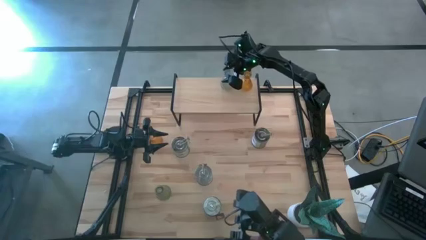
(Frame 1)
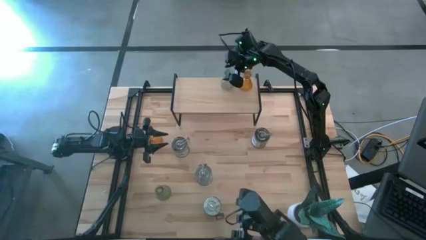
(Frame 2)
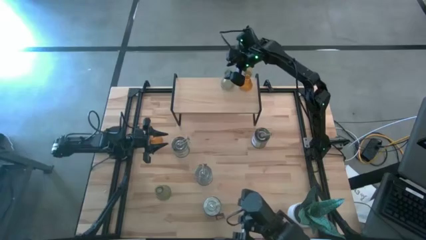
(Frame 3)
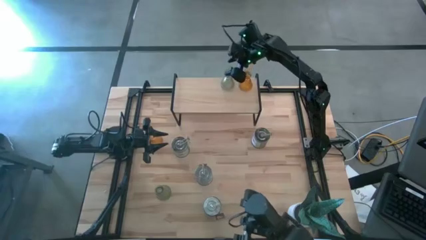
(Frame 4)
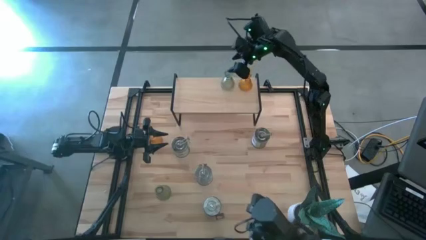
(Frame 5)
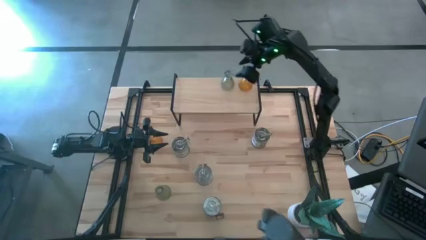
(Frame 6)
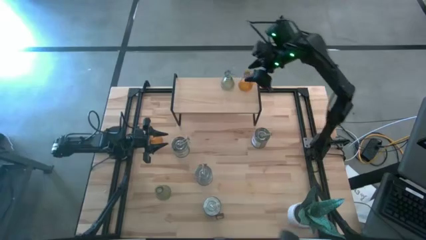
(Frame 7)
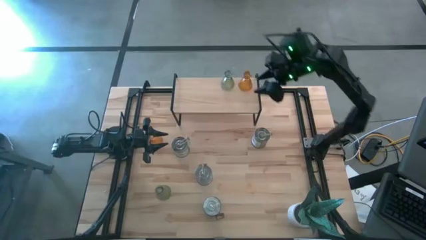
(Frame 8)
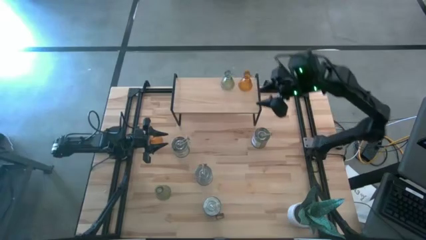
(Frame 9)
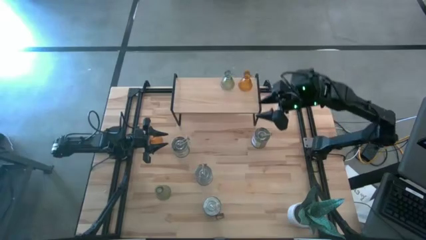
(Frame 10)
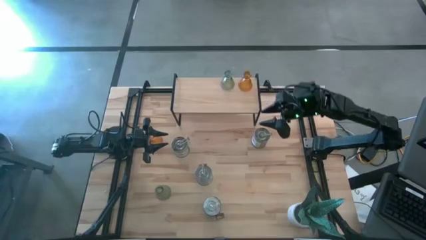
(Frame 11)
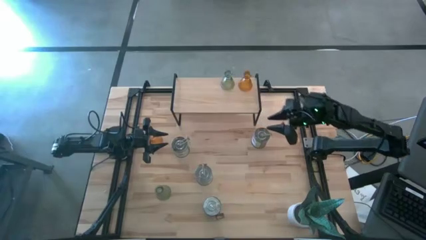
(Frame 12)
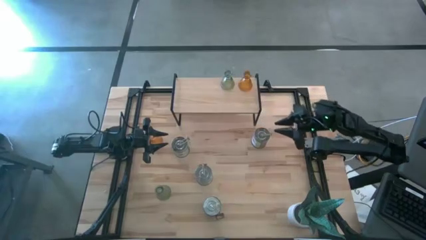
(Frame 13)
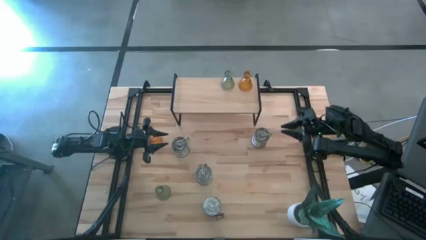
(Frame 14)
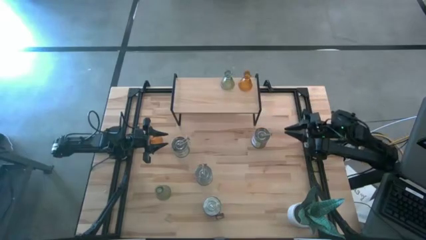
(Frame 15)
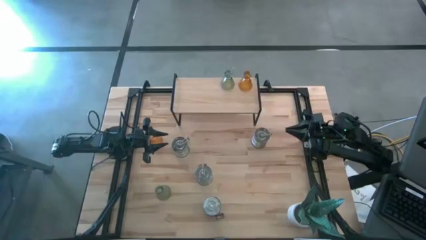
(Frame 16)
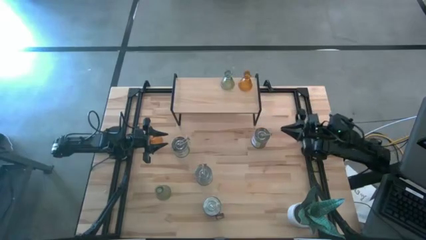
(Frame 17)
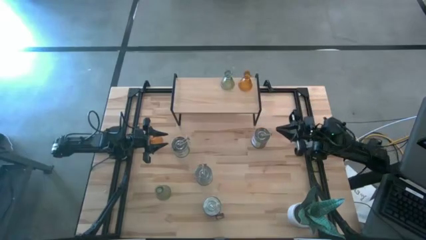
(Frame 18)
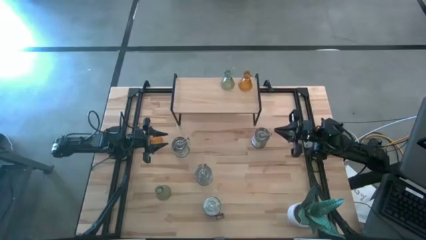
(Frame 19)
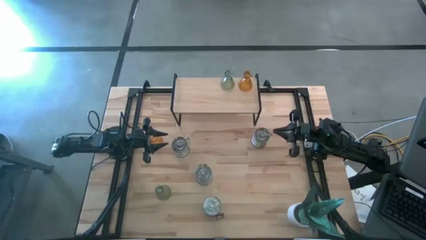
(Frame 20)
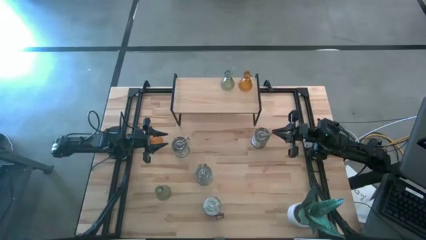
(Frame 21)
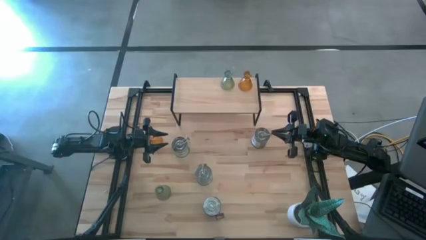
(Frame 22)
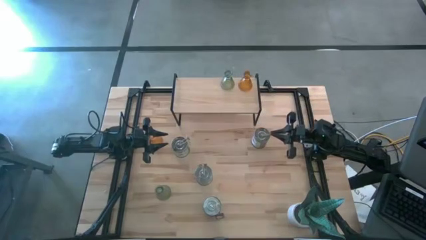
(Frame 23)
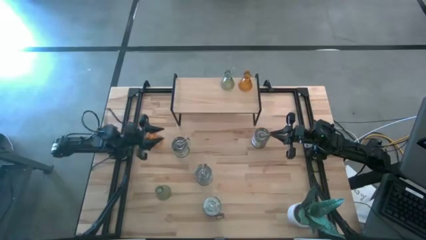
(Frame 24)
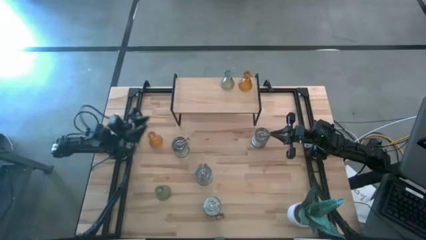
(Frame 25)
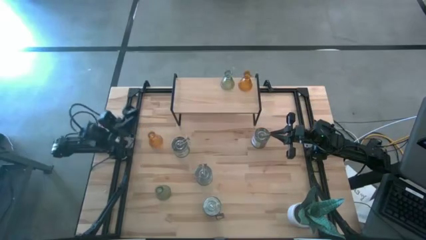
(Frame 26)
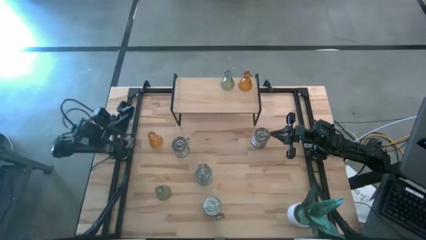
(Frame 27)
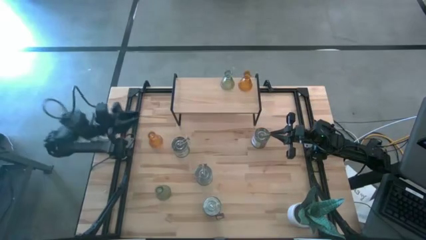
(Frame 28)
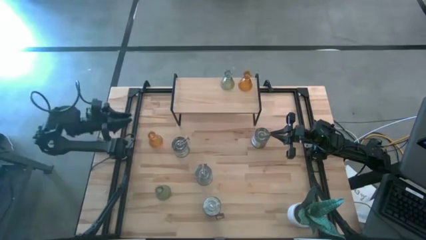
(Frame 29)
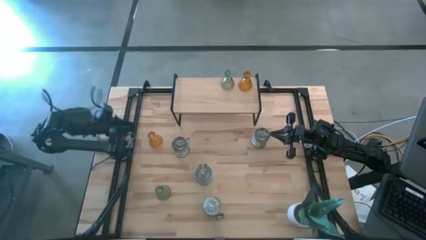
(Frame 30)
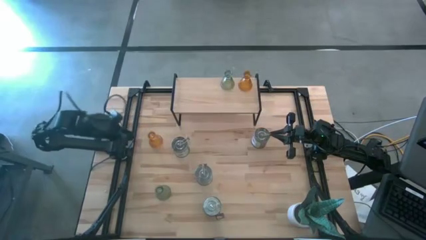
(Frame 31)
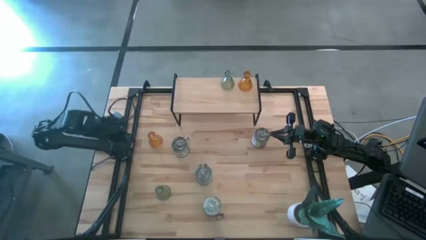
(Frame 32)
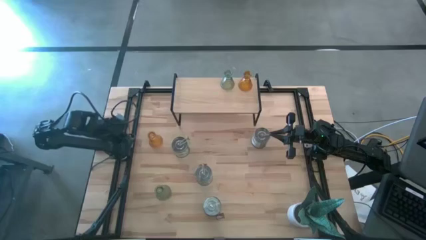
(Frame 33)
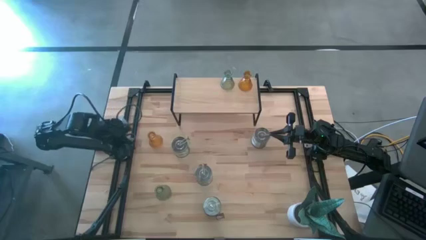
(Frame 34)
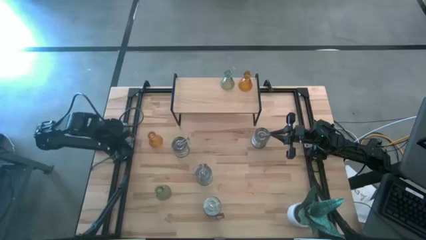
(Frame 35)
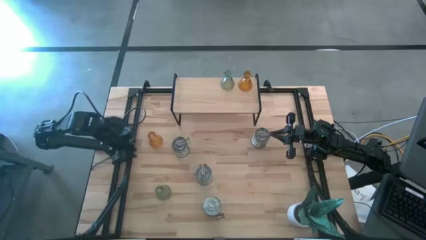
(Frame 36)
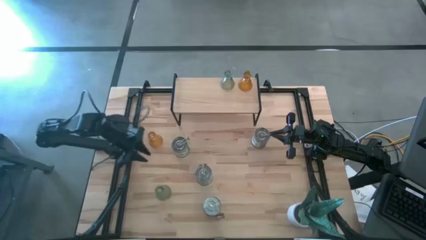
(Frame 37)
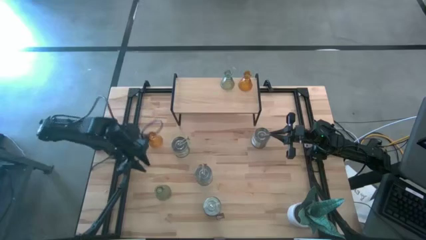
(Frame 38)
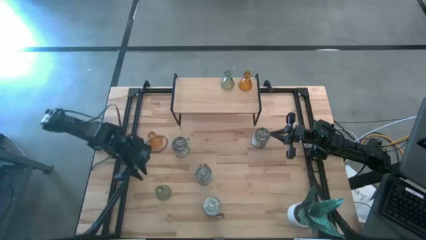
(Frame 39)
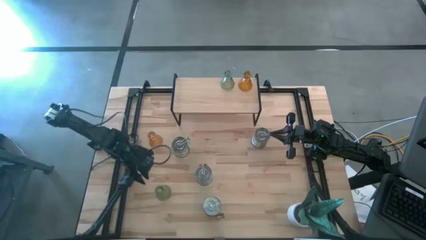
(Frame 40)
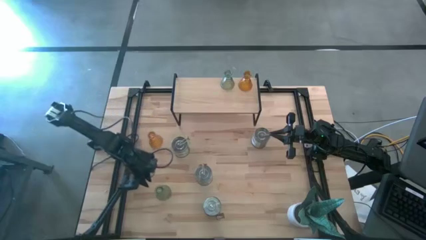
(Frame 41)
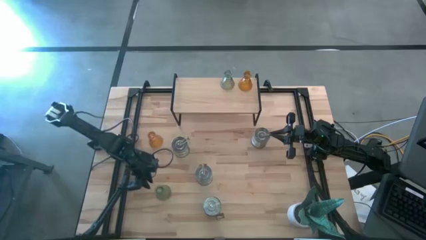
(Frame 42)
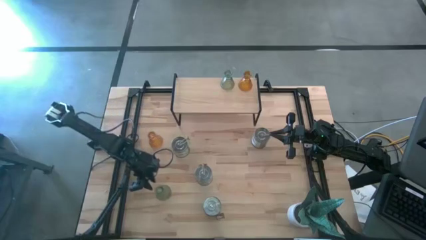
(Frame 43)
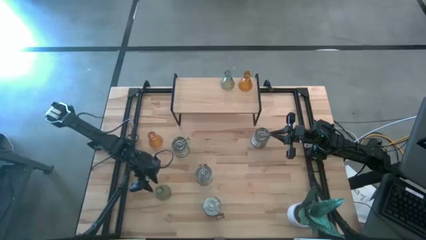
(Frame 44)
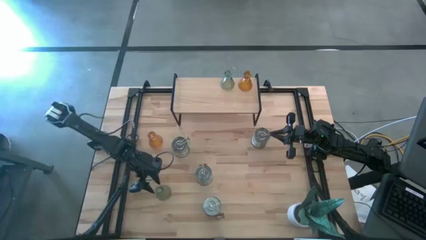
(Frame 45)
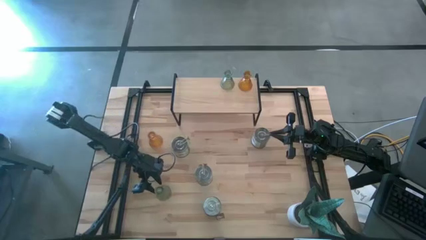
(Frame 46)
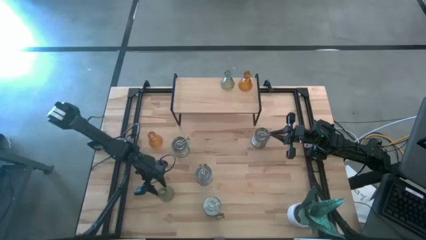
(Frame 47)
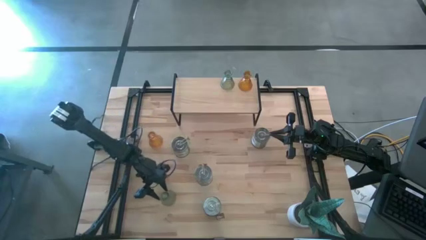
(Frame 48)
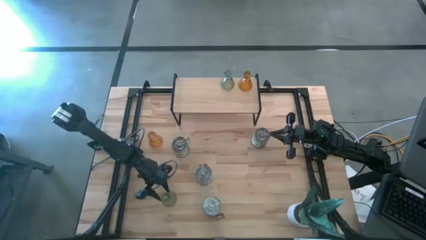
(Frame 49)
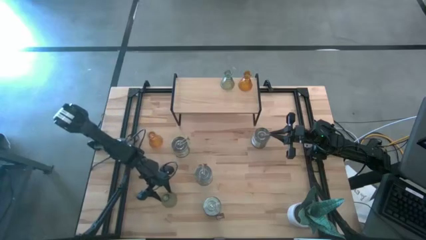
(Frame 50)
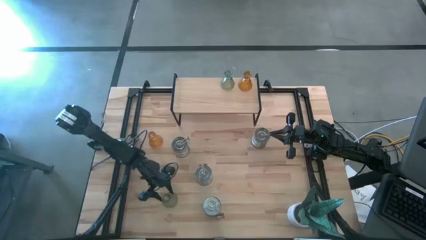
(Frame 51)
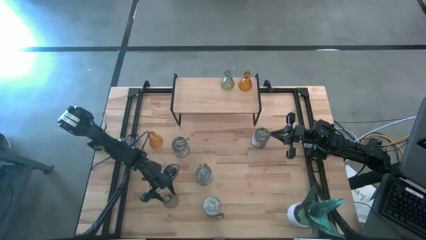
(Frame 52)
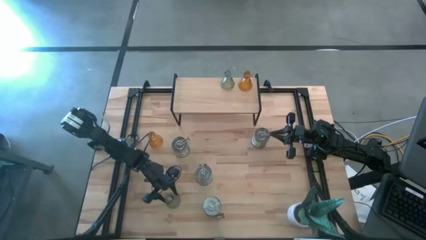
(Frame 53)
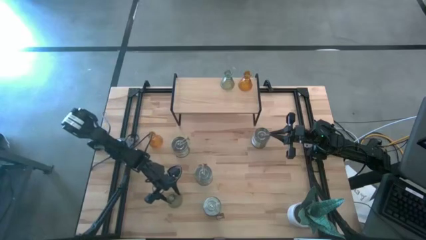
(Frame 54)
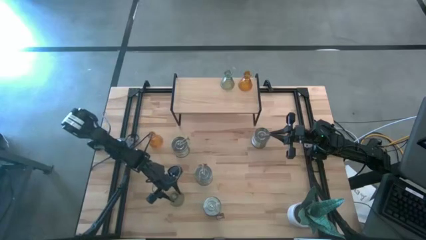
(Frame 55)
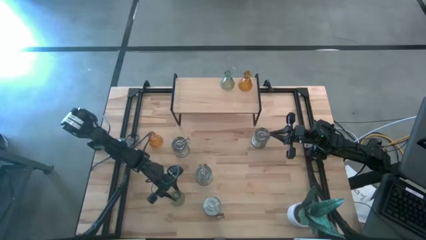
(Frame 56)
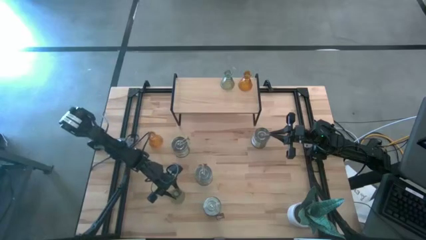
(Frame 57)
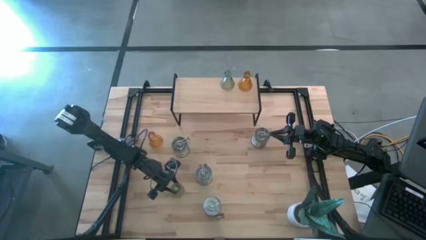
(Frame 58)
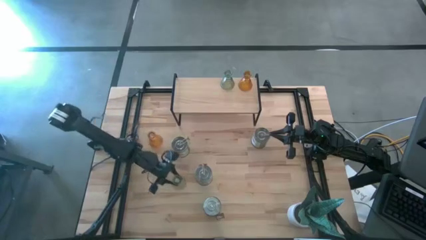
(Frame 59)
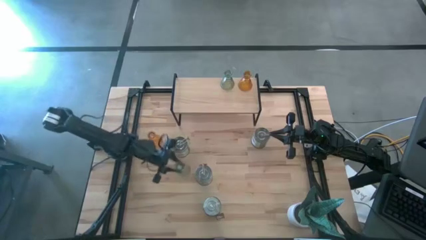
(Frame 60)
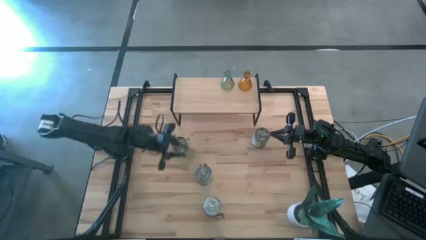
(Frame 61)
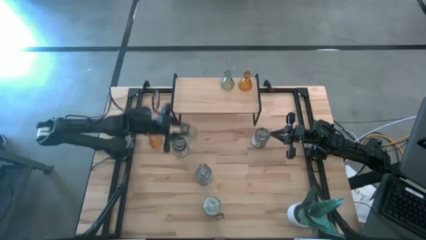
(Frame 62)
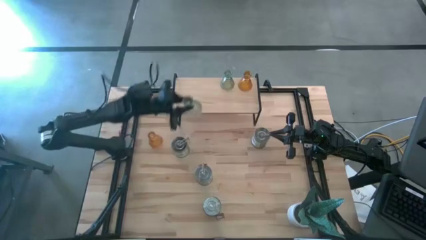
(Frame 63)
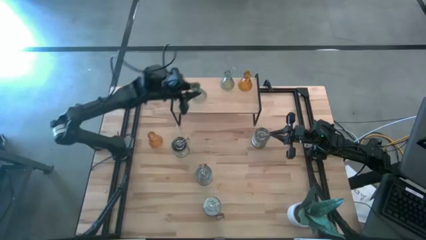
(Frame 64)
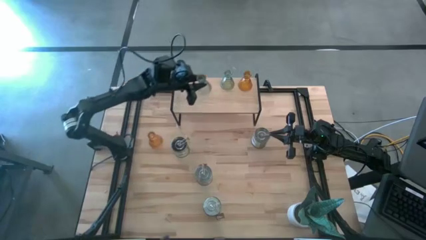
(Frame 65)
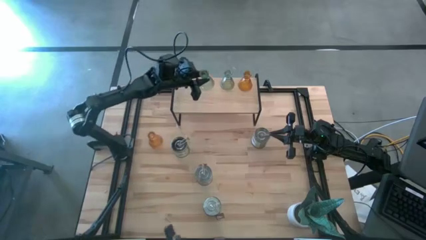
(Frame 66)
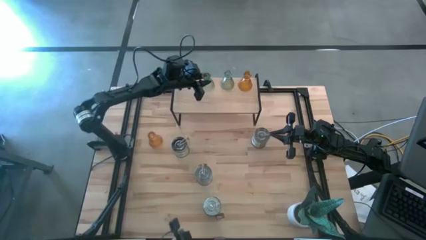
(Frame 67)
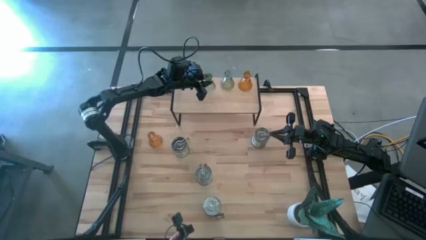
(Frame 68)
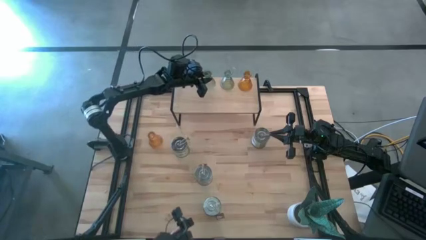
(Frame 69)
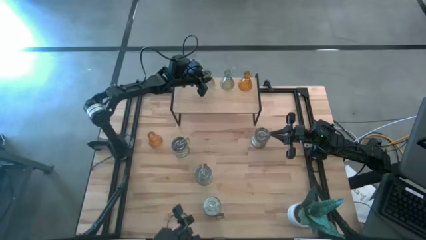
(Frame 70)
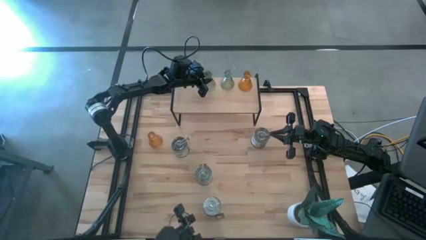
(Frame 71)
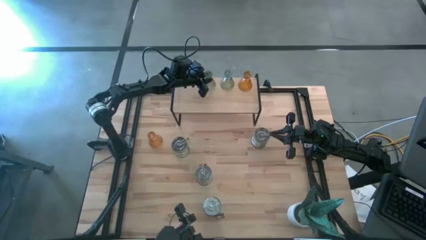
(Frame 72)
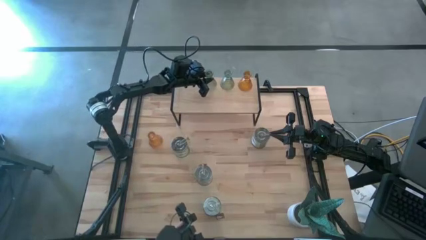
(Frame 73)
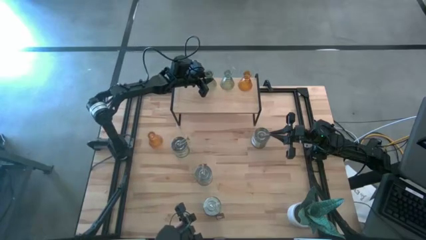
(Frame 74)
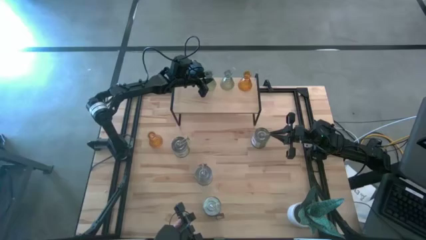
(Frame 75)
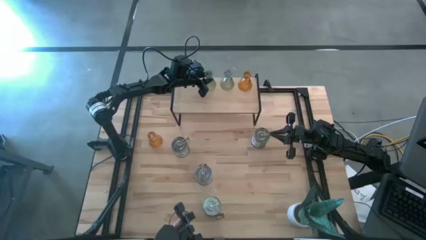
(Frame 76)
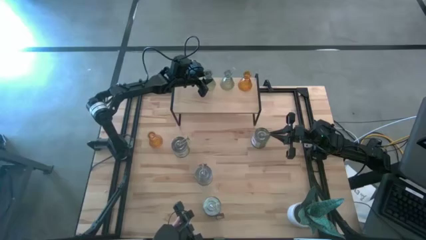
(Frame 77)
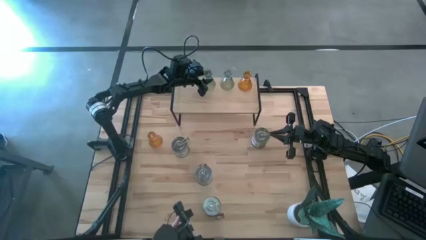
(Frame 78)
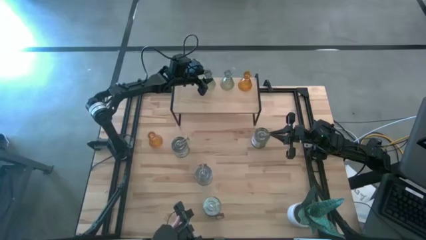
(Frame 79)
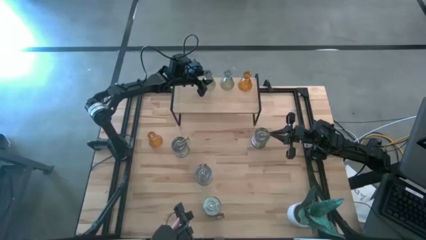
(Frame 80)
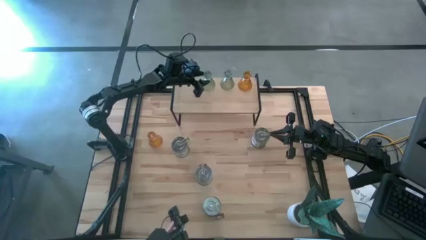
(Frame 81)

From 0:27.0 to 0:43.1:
Task: Pick & Place candle stick holders
Put the green candle holder on the shelf aligned with the green candle holder
